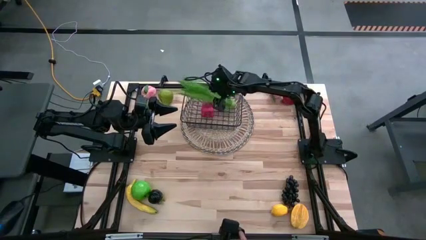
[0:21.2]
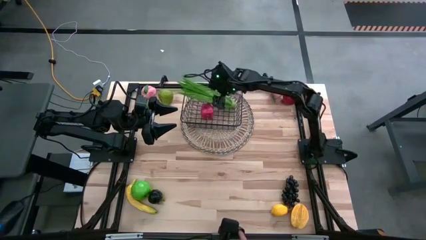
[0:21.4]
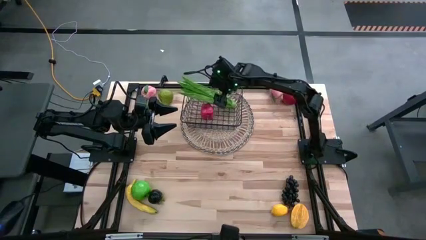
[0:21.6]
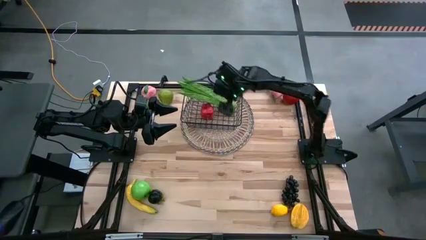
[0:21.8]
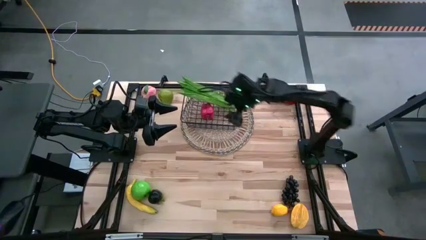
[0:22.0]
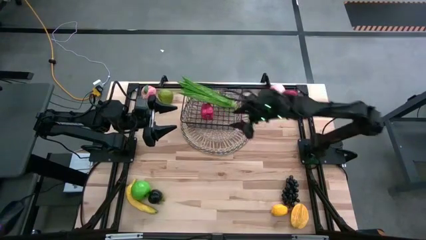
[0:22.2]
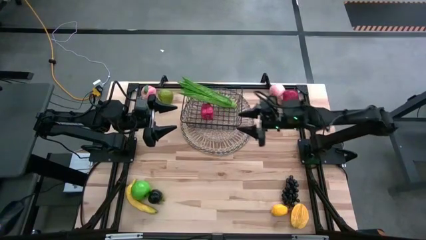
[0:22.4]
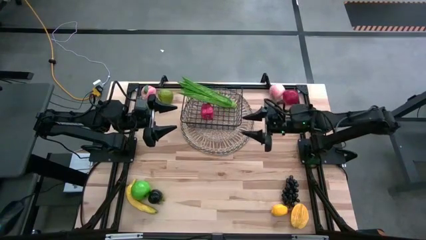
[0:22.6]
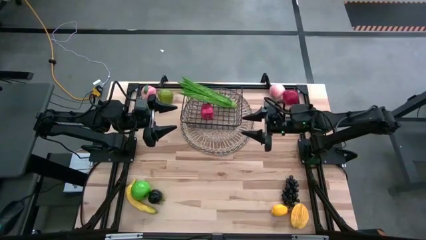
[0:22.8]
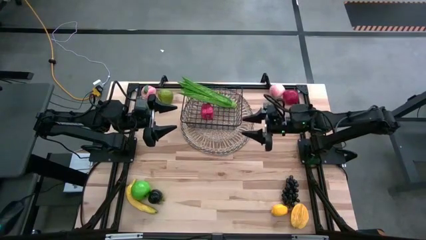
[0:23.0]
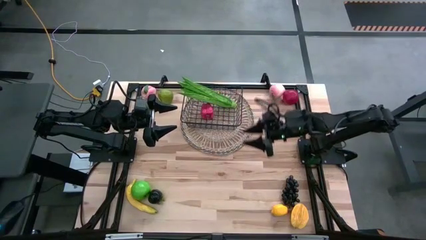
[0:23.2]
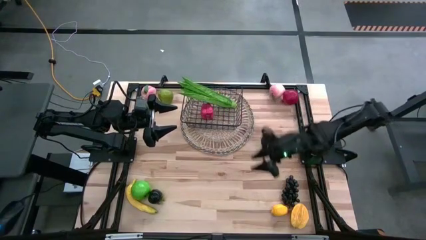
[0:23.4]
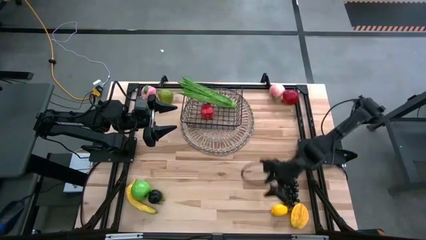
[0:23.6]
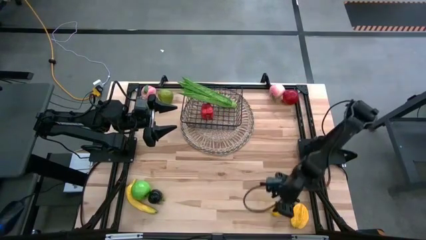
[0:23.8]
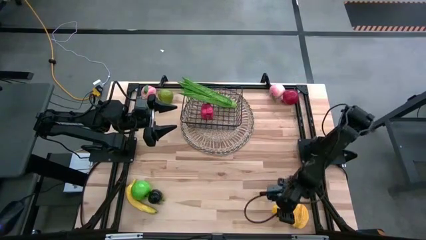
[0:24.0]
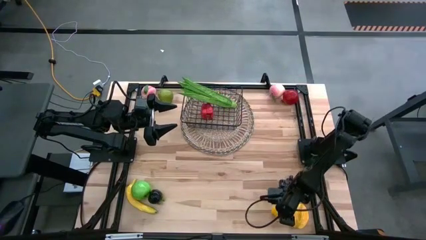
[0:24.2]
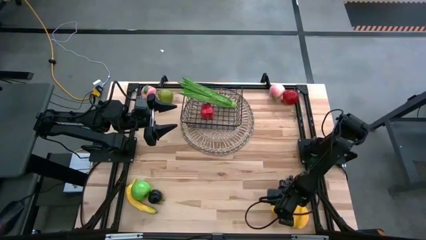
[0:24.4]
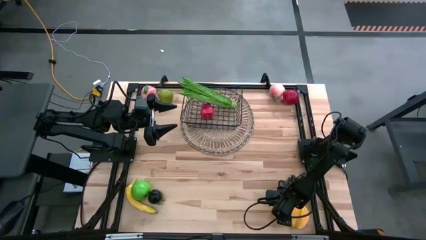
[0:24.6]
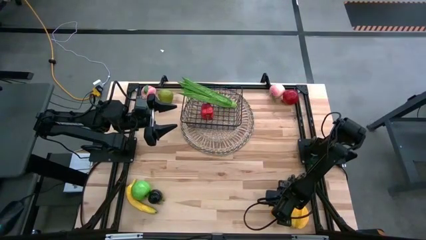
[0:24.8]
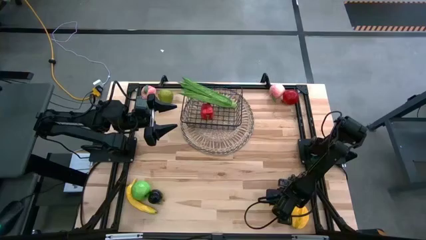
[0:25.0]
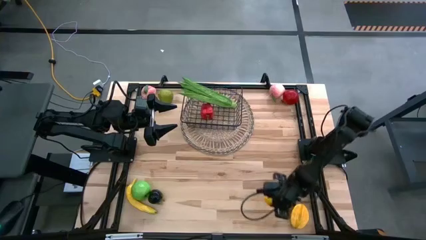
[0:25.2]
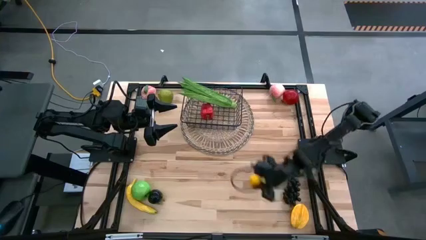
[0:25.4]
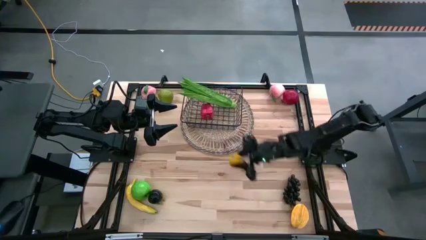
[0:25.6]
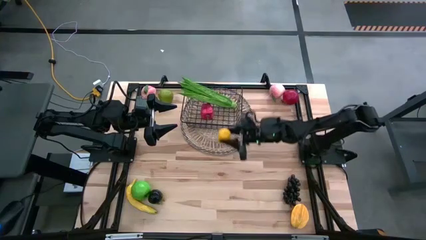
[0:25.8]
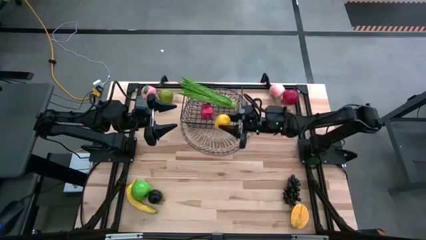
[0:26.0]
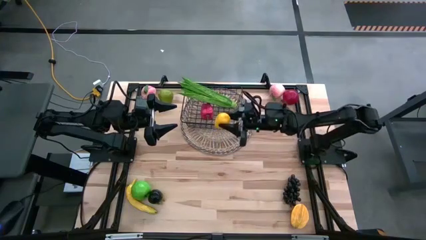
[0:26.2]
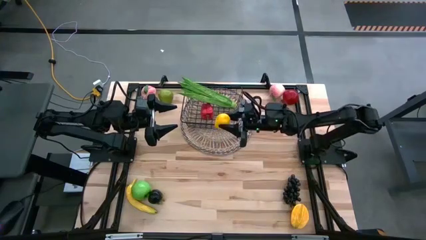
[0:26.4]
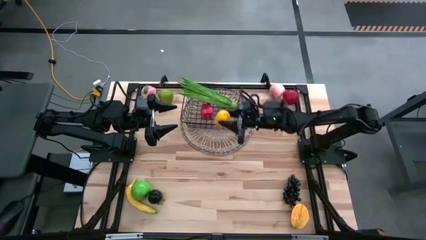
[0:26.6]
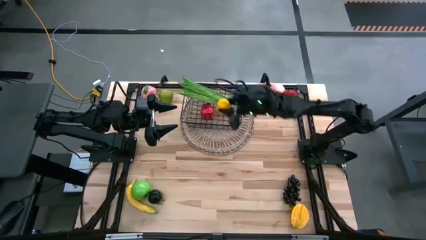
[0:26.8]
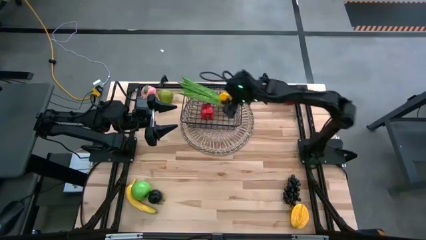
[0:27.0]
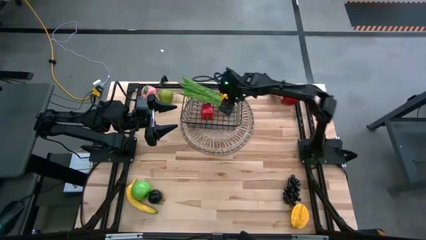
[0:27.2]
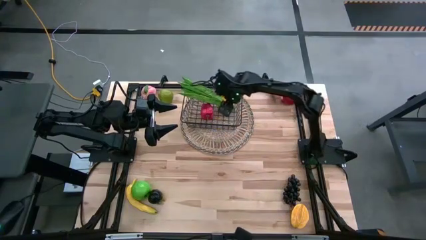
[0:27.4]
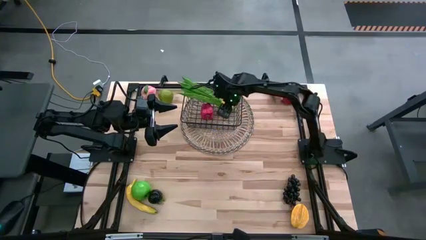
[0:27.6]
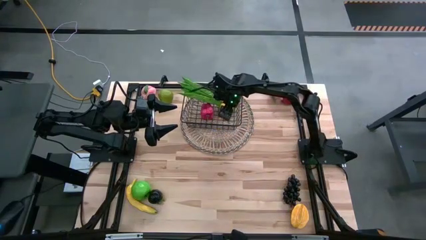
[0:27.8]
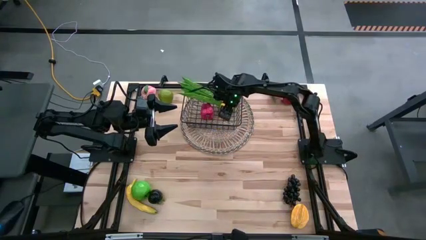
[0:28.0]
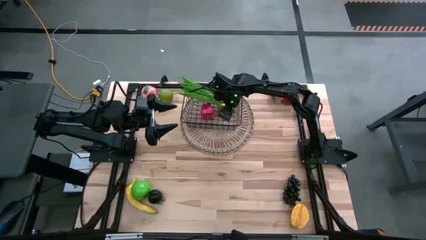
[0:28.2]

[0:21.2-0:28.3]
Task: Build produce basket
Put the lemon into the black wire basket

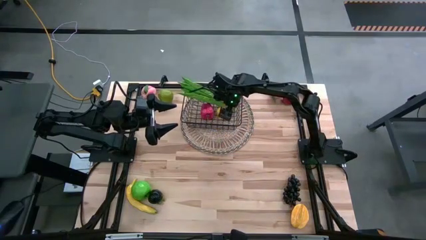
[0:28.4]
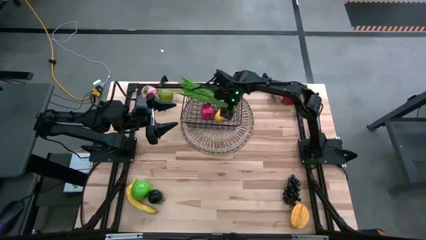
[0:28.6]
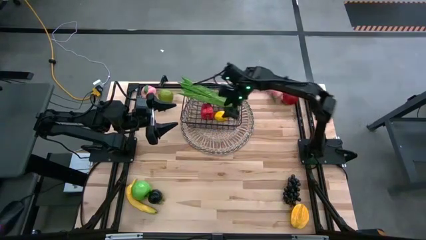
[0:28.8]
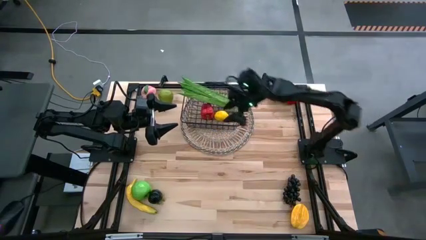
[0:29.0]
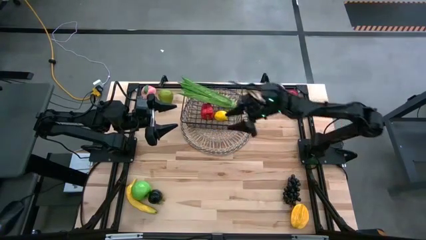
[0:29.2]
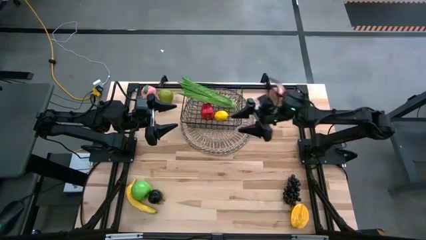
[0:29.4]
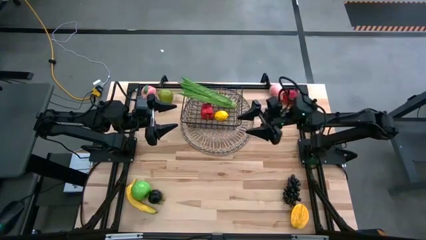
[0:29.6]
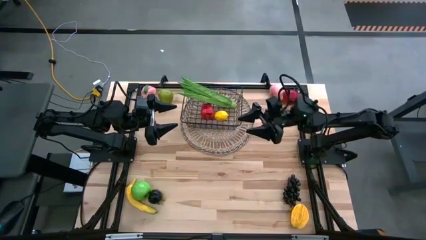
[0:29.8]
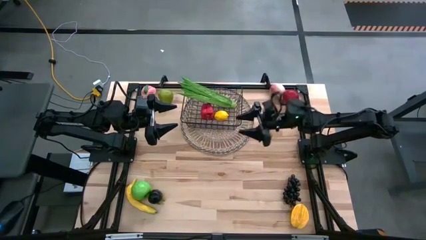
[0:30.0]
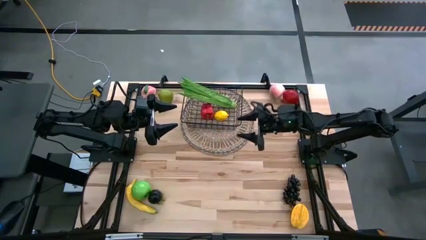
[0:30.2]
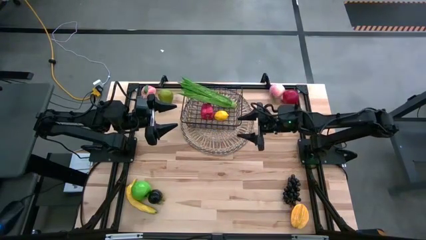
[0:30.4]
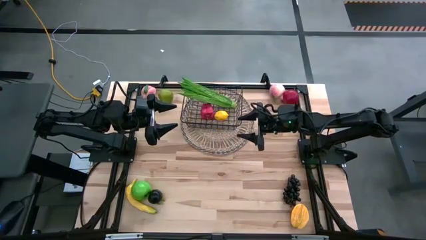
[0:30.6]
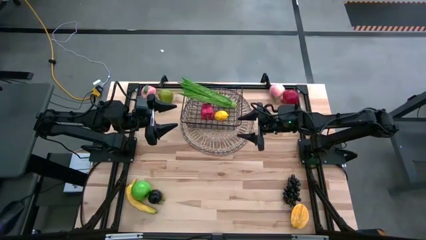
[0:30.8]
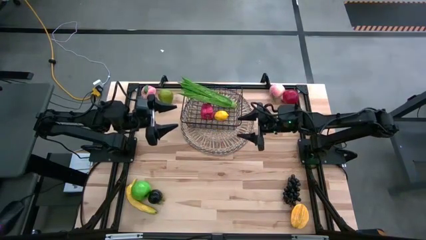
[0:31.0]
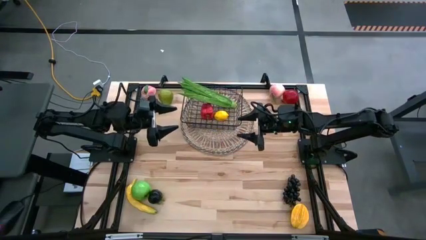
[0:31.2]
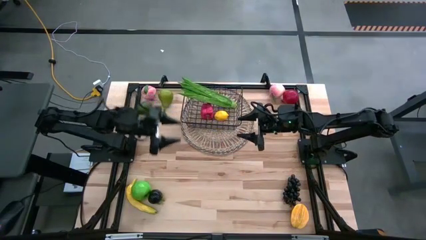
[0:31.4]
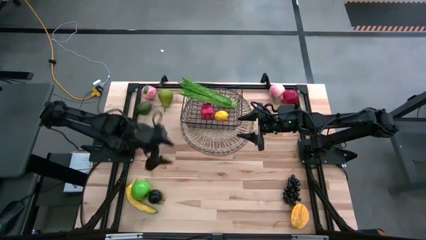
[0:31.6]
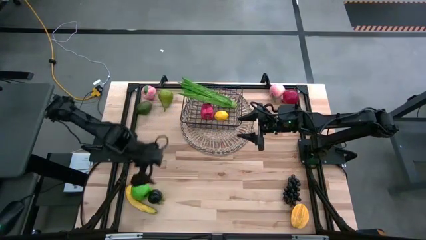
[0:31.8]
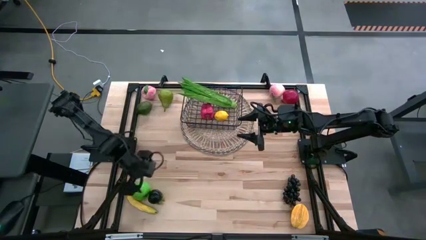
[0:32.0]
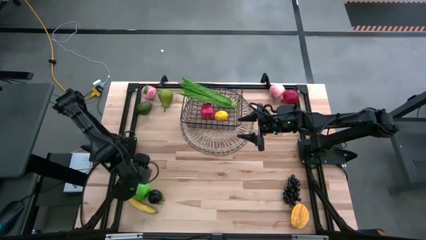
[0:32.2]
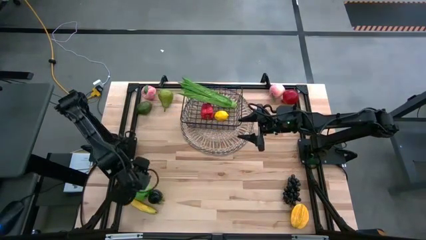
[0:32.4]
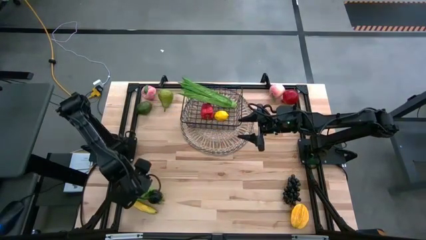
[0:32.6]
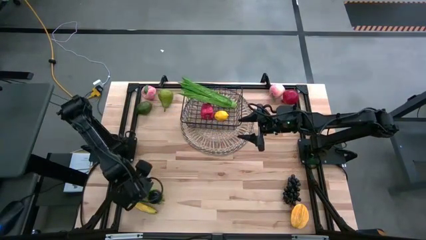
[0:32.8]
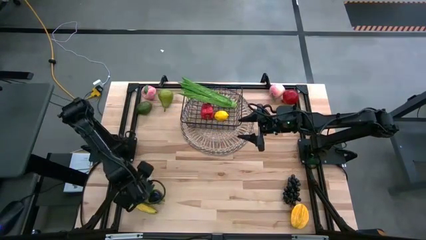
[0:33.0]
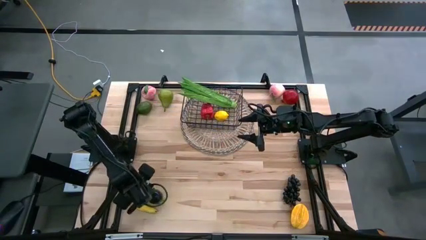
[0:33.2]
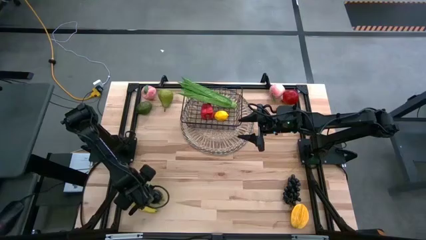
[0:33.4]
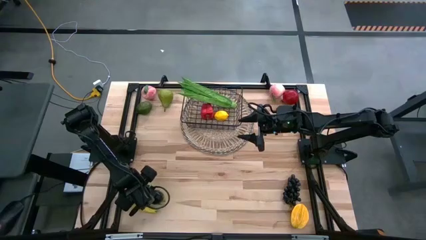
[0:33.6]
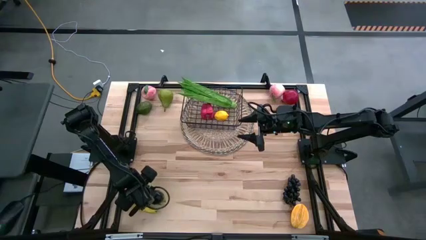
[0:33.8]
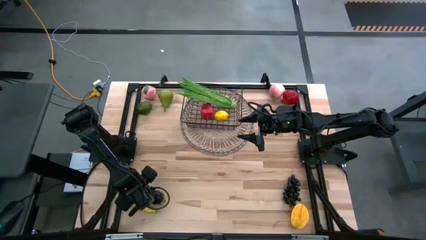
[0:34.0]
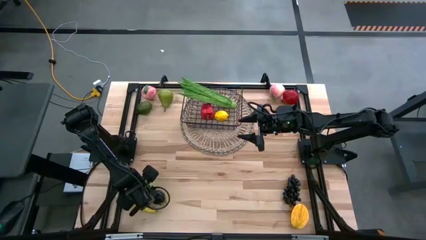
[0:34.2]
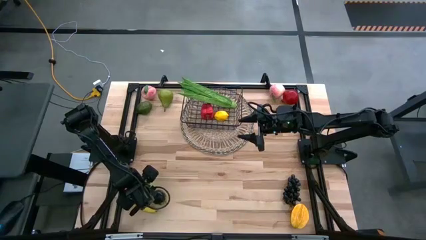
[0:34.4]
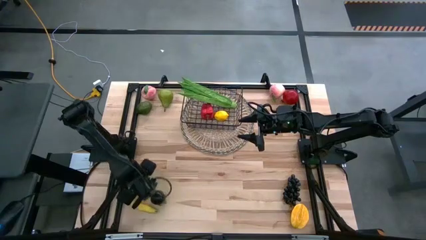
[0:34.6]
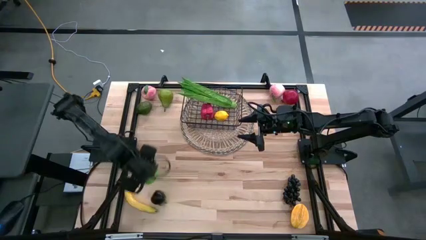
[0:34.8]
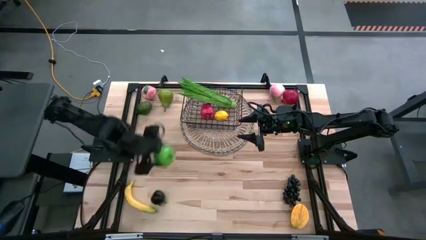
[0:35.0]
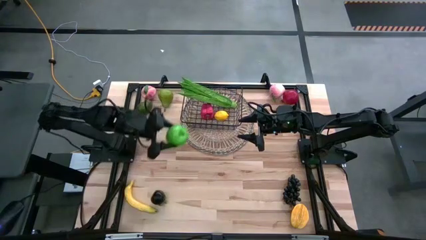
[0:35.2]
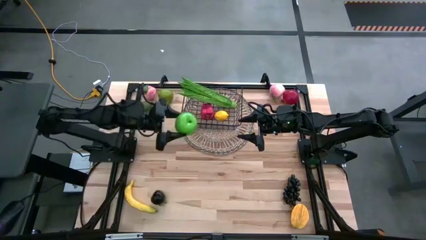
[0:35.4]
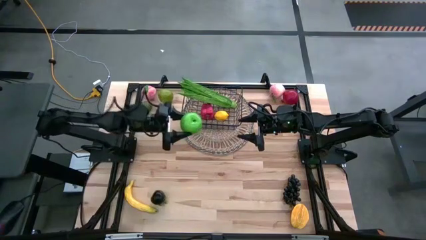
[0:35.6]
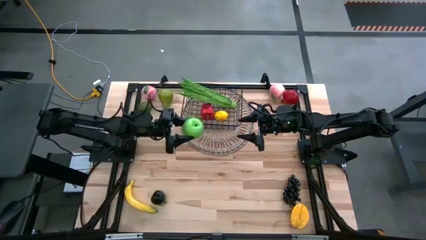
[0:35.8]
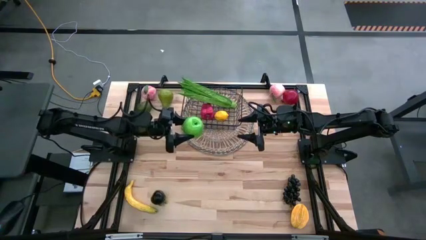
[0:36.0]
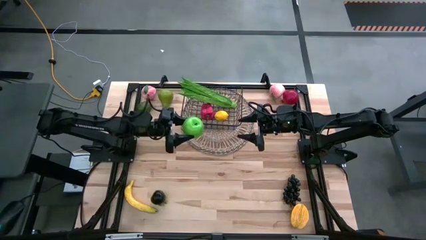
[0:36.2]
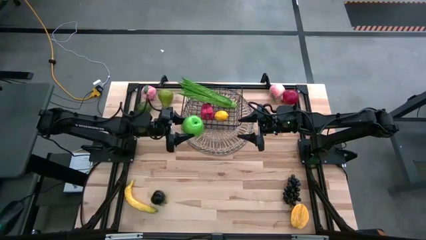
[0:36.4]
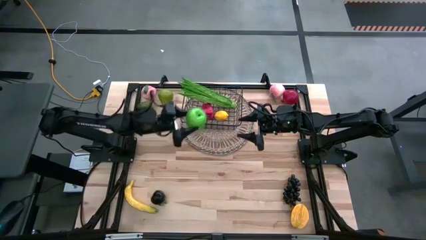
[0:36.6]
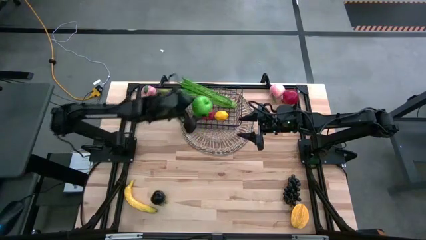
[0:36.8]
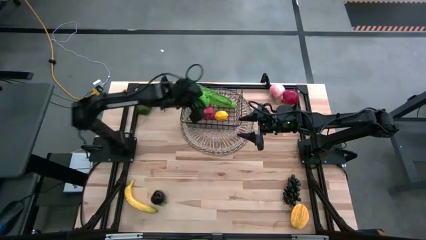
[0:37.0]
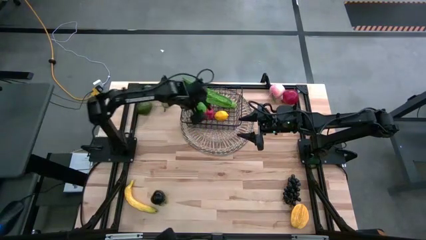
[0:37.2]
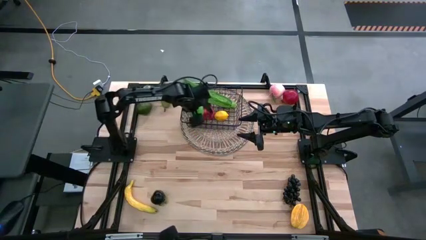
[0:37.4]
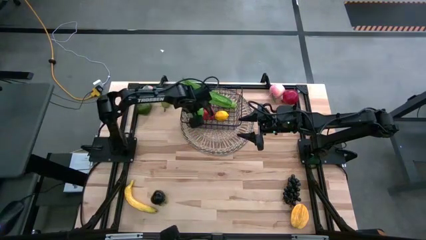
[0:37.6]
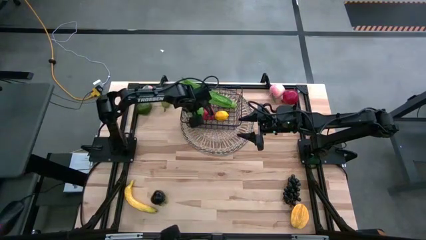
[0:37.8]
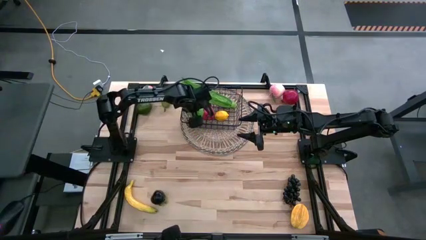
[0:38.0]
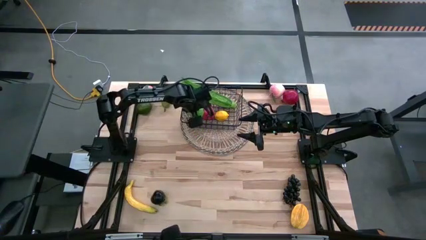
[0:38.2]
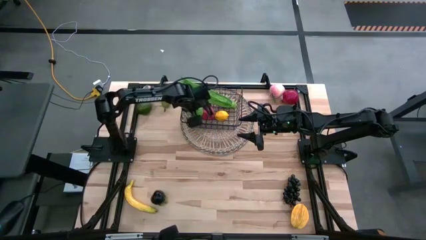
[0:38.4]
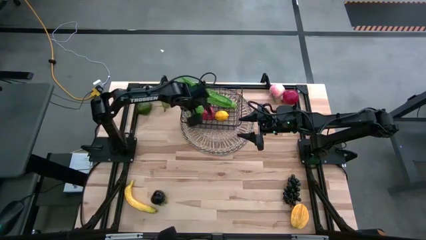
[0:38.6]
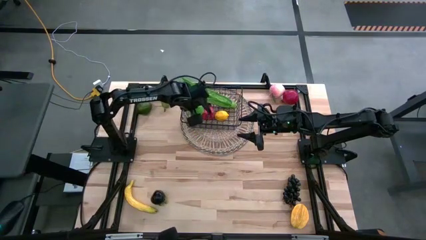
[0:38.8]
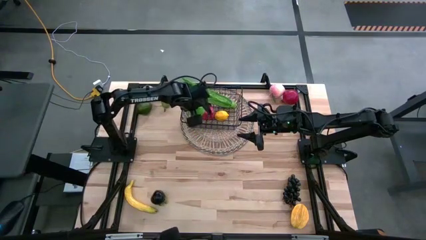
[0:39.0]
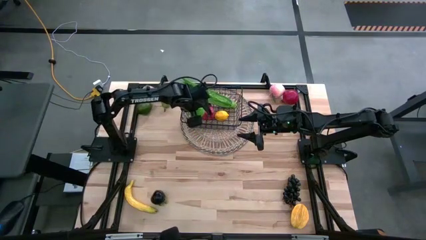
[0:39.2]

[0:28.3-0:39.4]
Put the apple into the black wire basket
